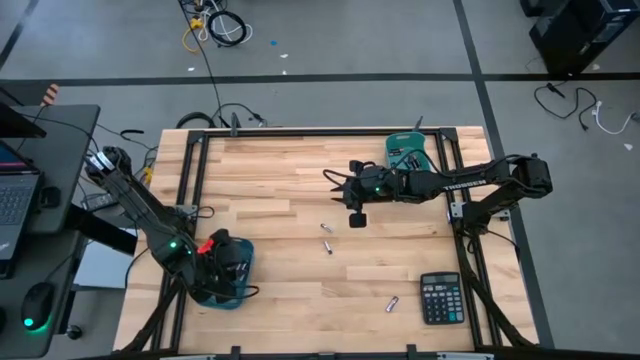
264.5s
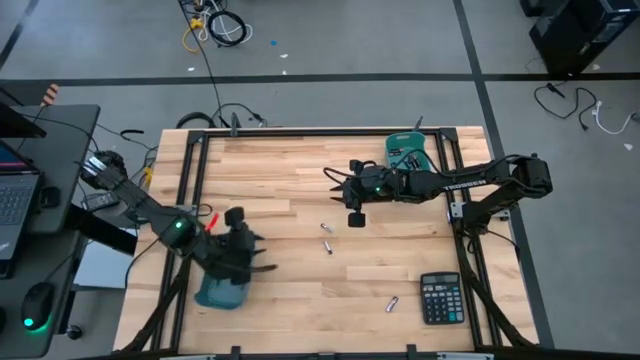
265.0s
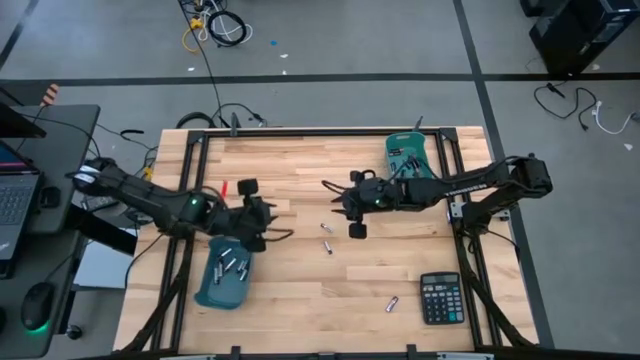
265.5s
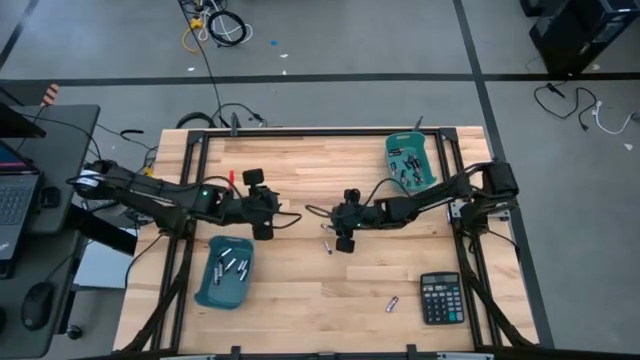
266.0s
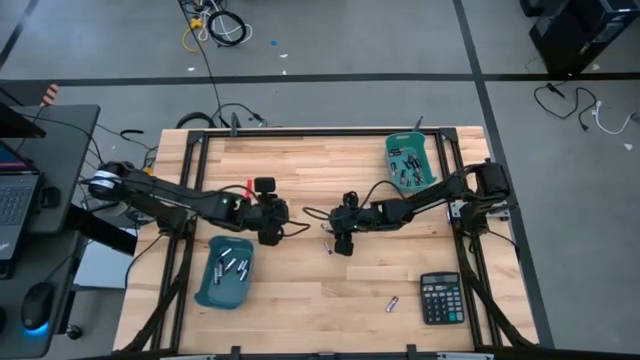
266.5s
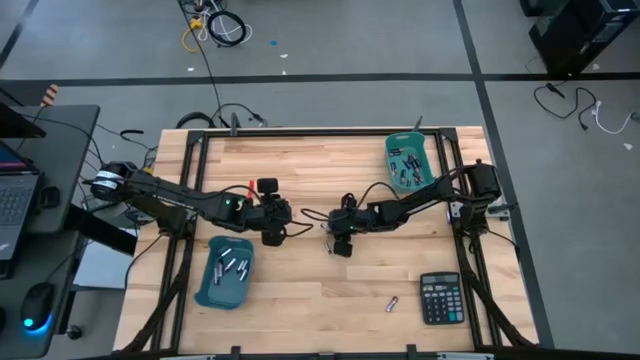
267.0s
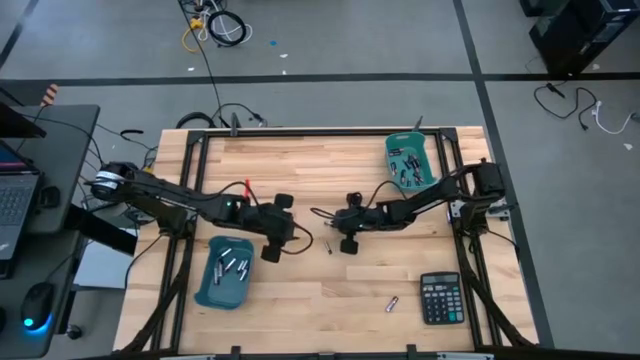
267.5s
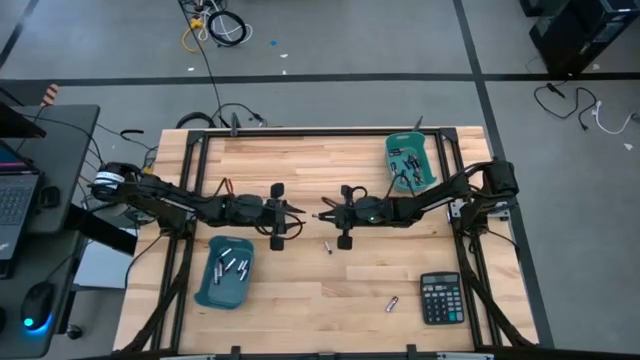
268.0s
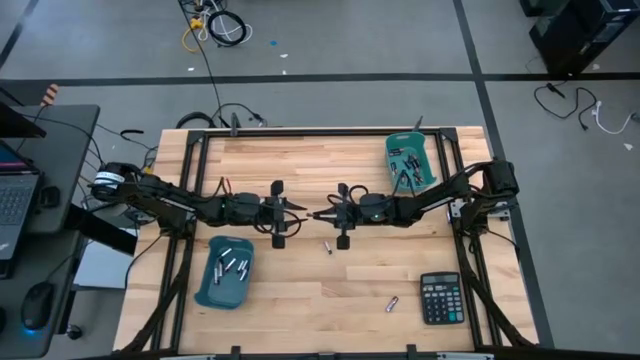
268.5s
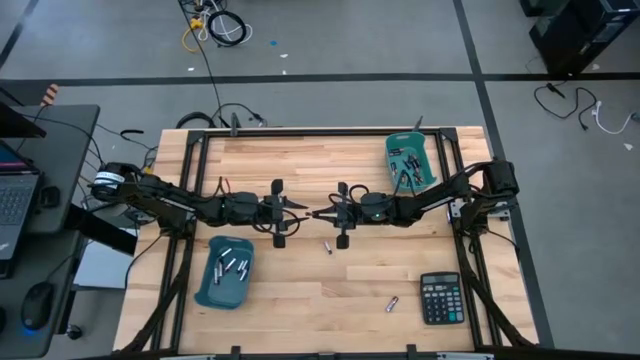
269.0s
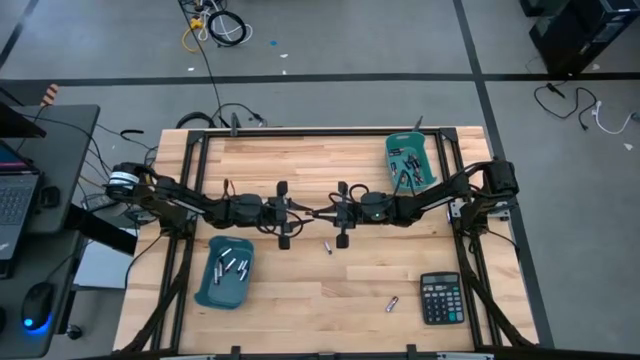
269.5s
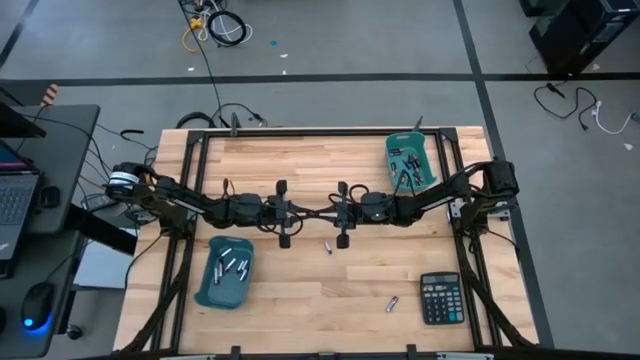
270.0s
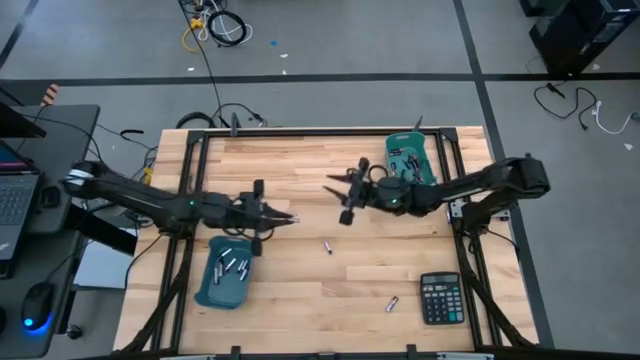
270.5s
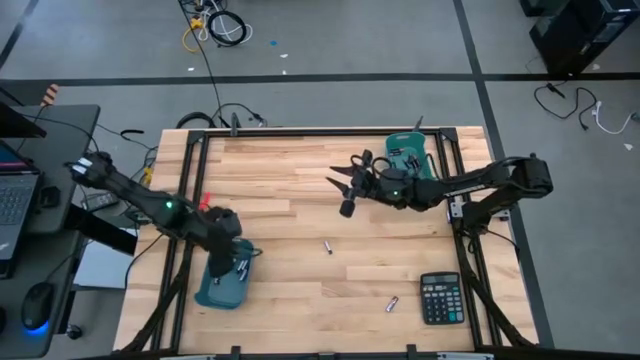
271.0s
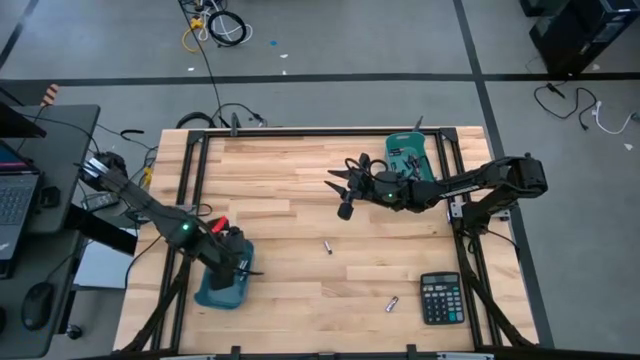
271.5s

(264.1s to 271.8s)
Task: Sort batteries
Put the silver battery into the blue bin

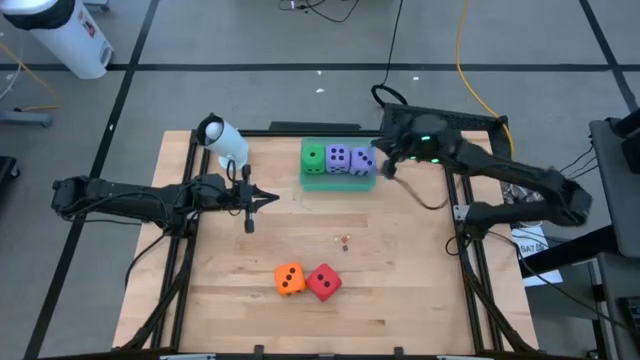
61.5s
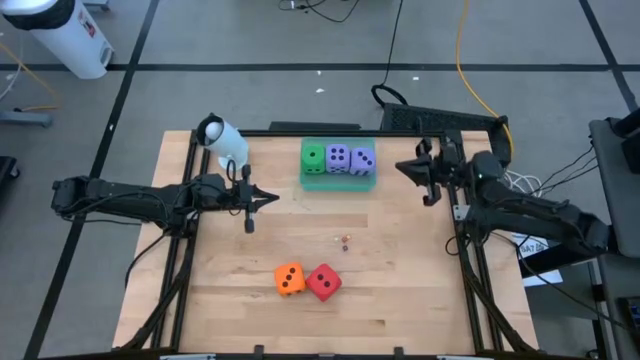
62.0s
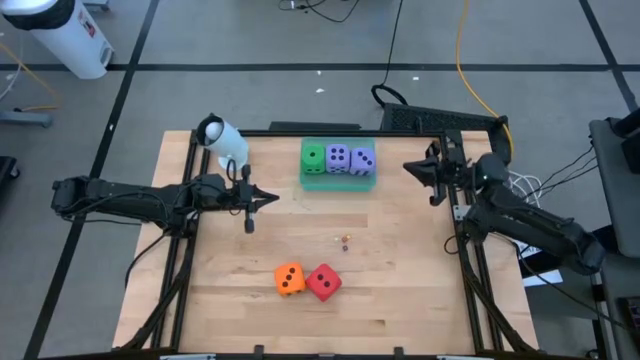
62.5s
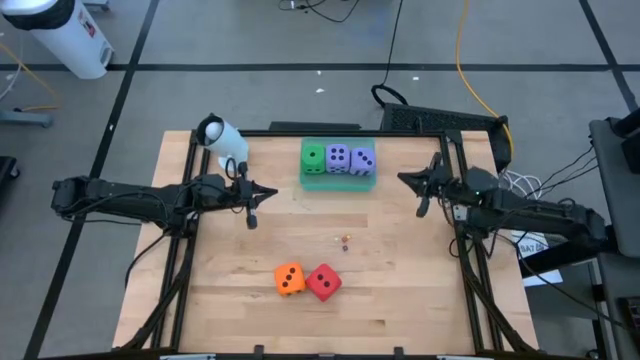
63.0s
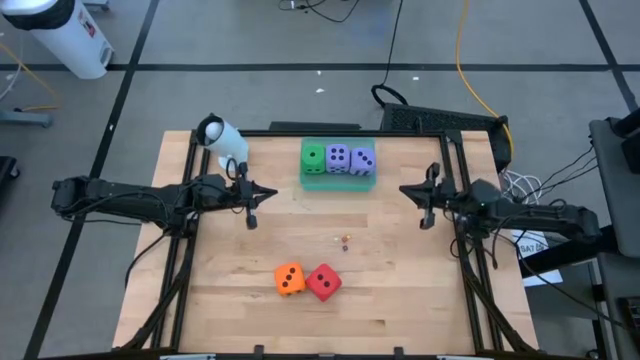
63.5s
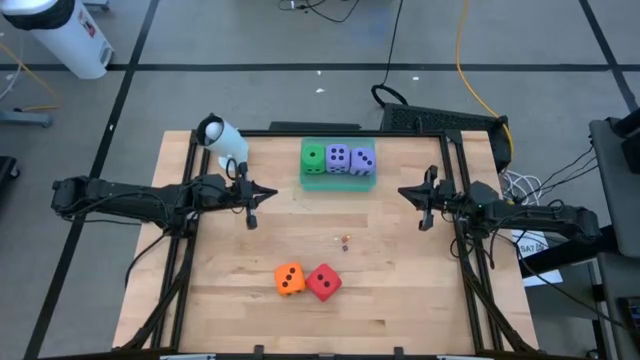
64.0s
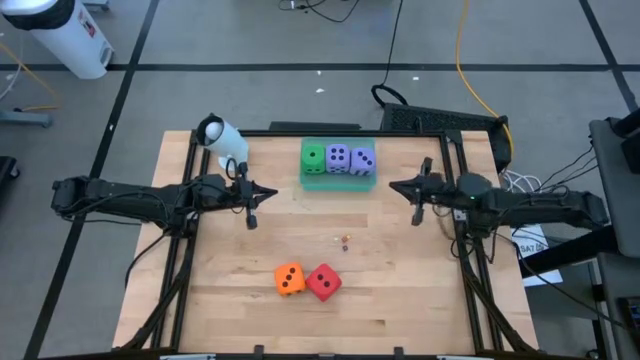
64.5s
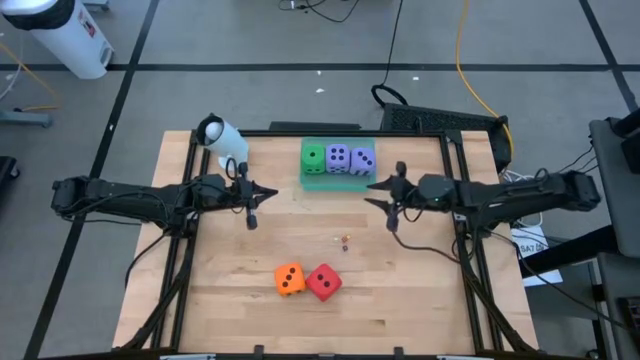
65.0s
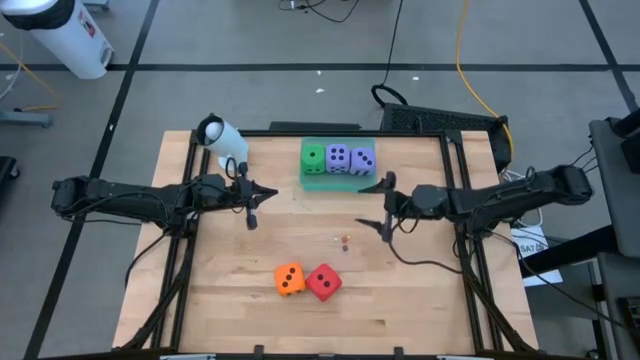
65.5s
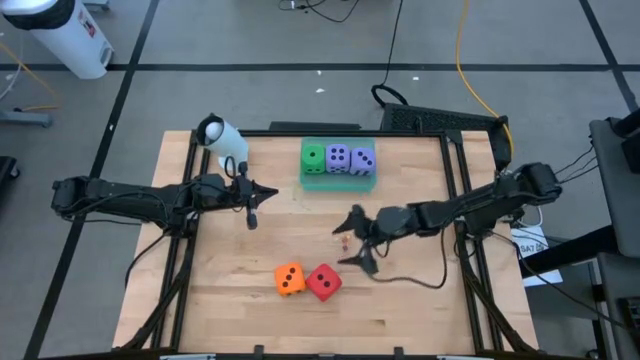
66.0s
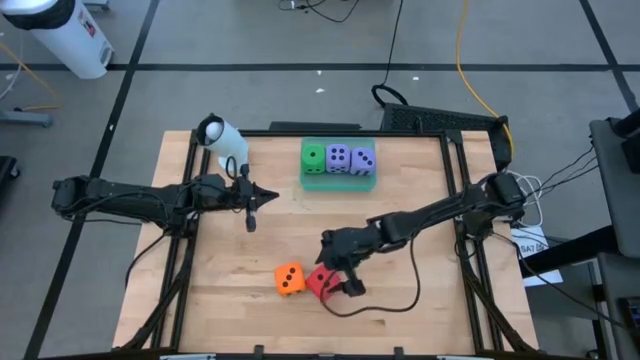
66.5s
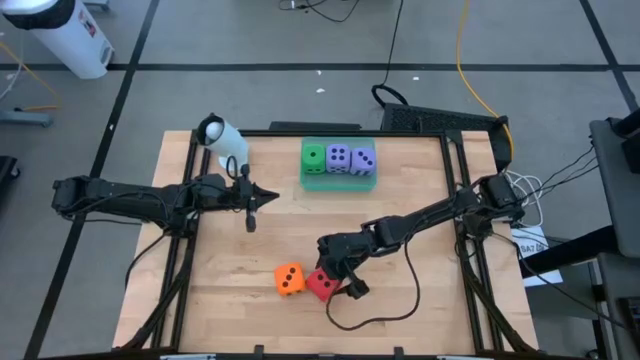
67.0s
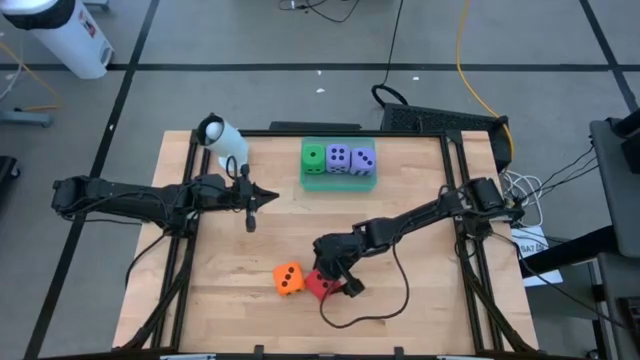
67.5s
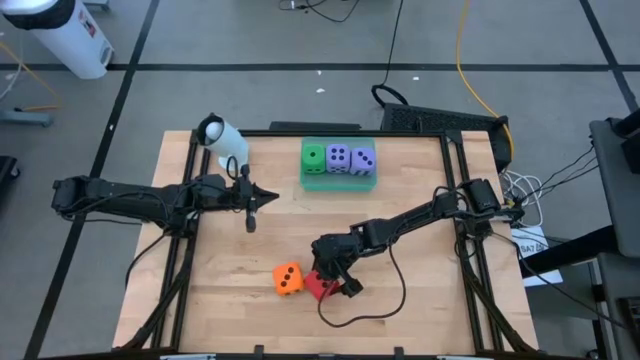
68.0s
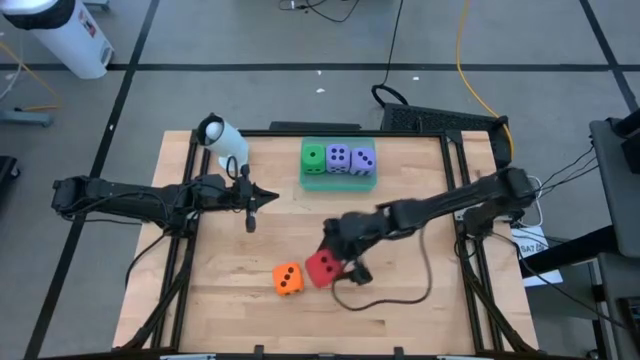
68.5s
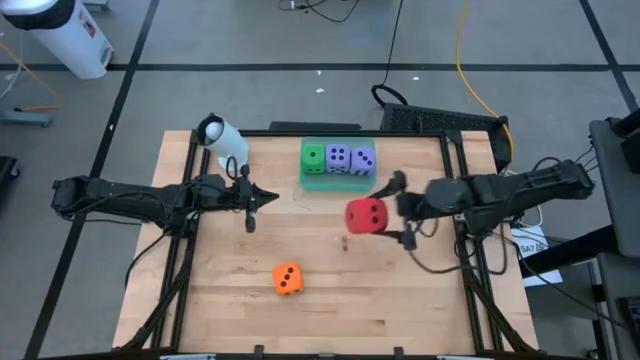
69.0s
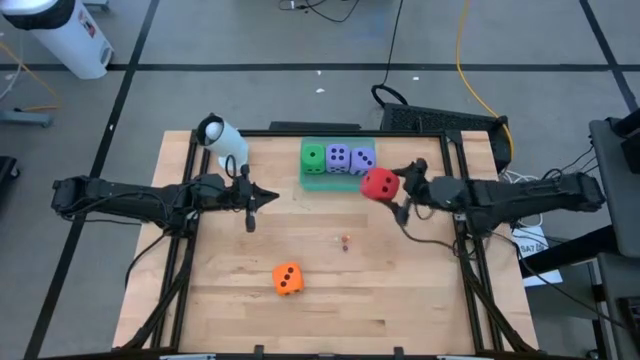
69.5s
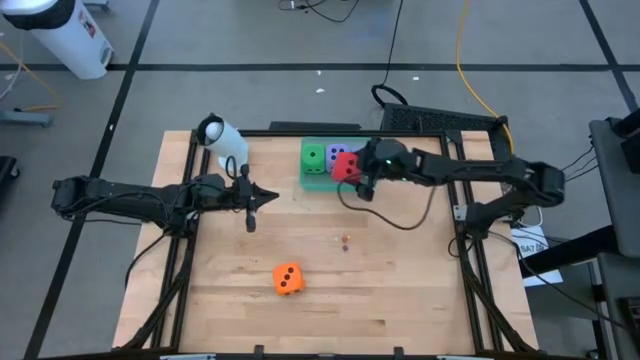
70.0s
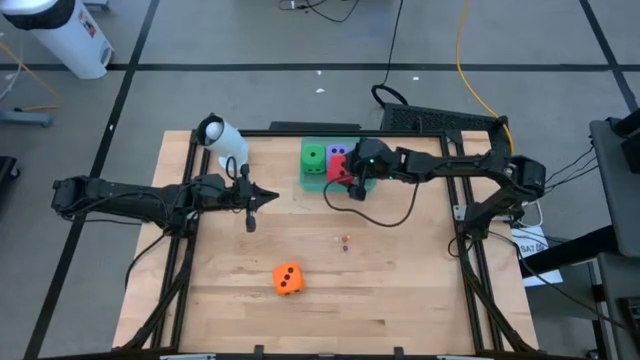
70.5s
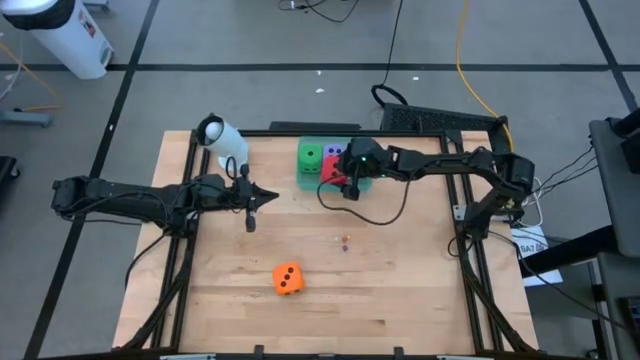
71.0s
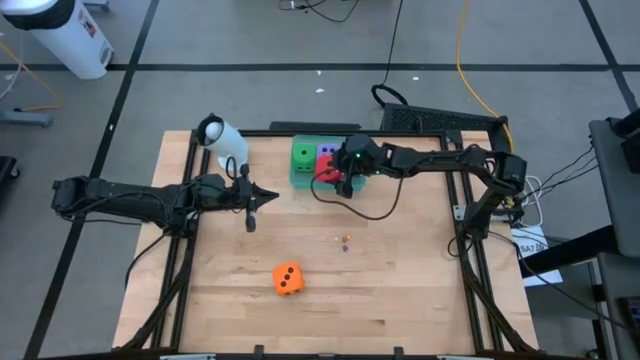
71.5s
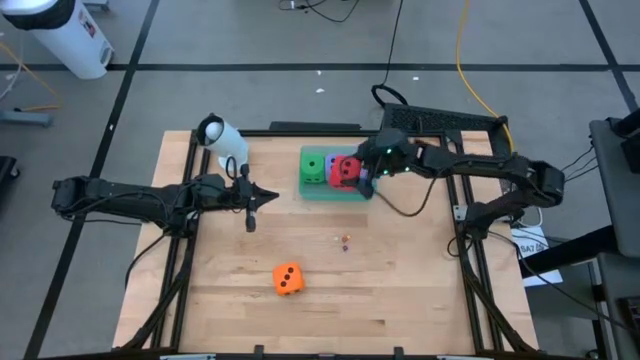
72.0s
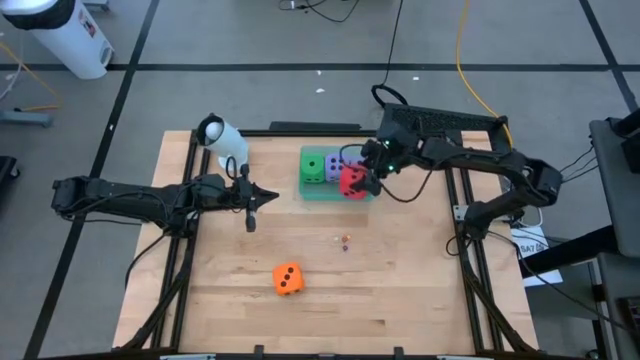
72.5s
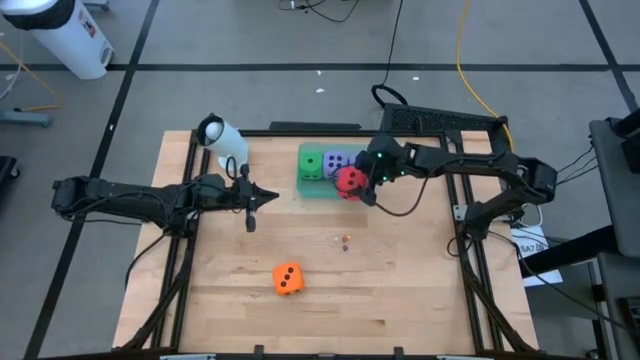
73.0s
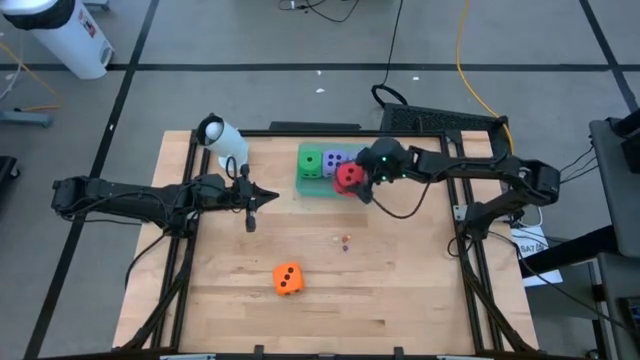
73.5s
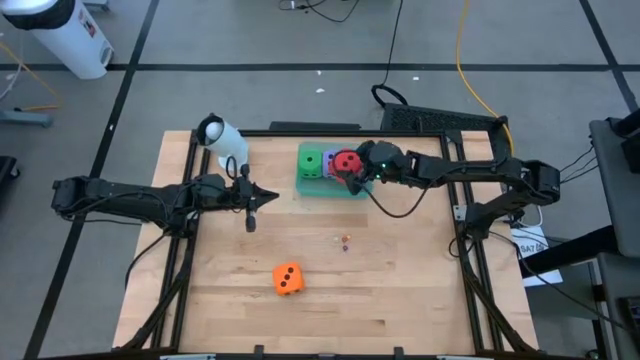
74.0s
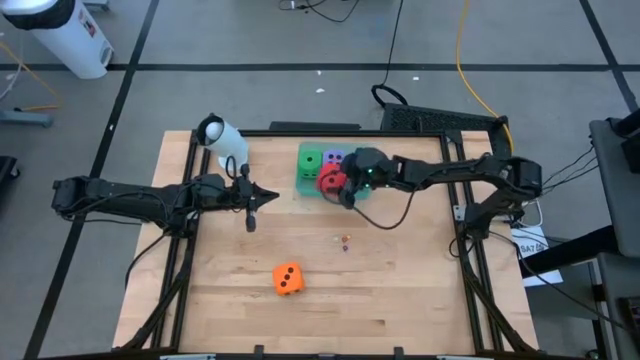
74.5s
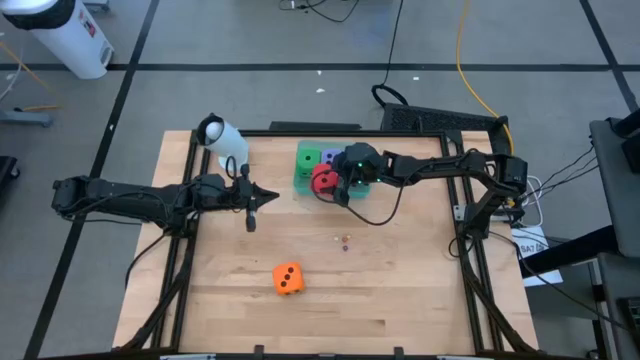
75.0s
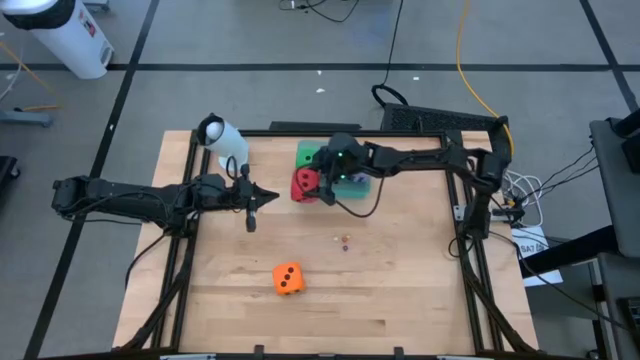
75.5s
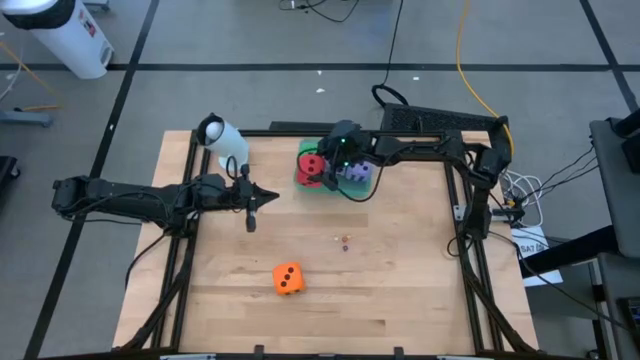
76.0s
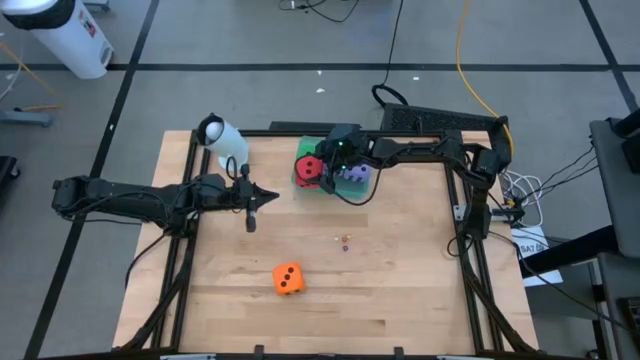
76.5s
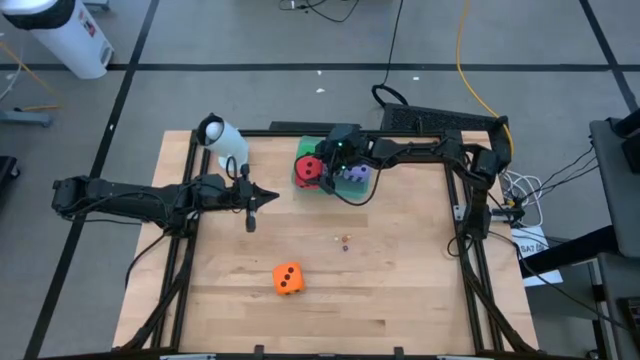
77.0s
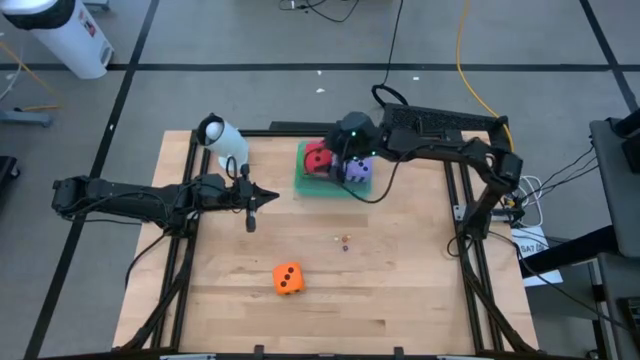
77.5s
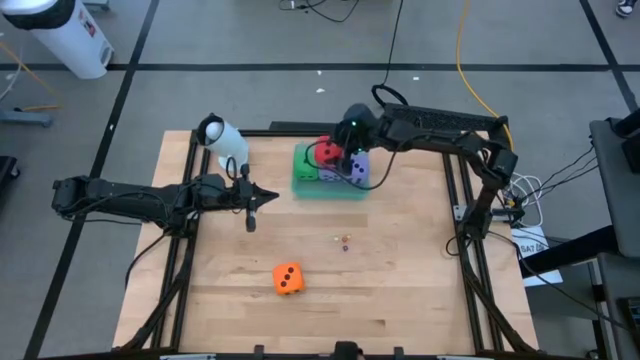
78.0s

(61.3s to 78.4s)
Task: Pick & Place Dice
Put the large red dice into the blue bin
